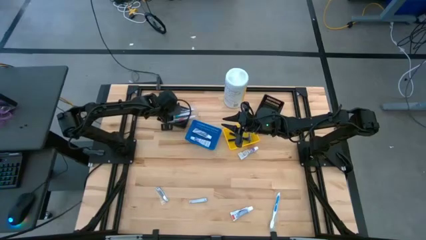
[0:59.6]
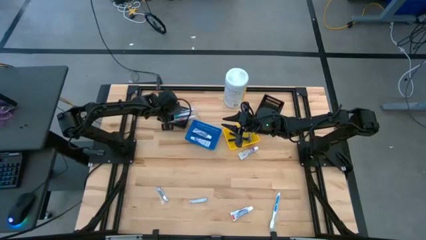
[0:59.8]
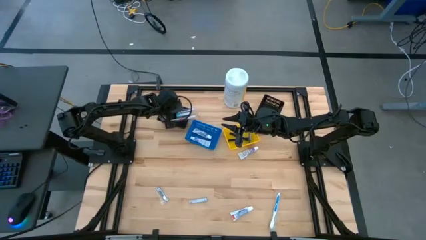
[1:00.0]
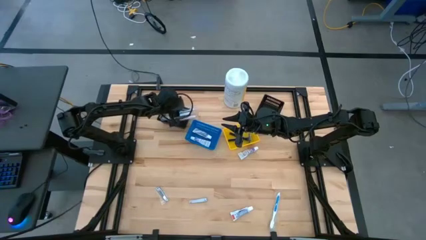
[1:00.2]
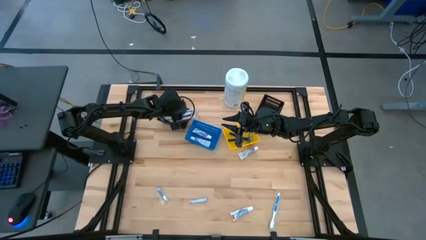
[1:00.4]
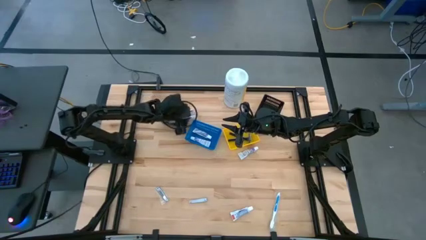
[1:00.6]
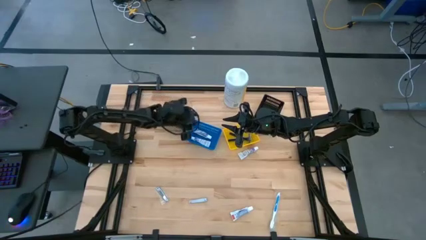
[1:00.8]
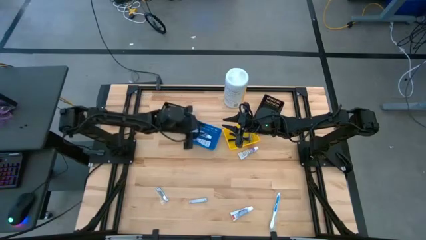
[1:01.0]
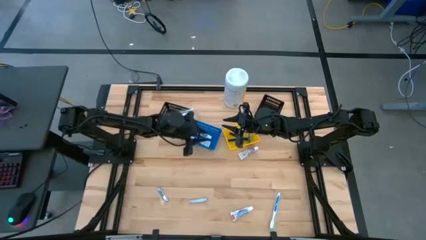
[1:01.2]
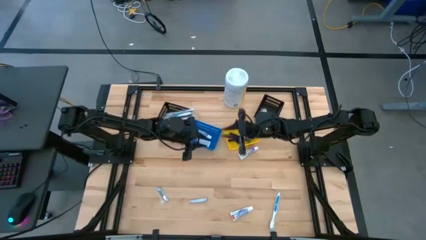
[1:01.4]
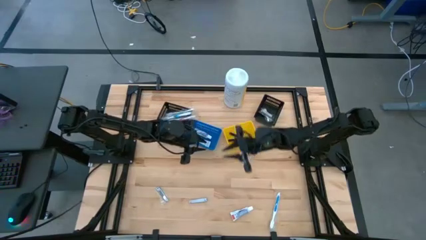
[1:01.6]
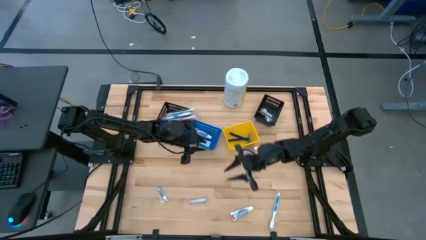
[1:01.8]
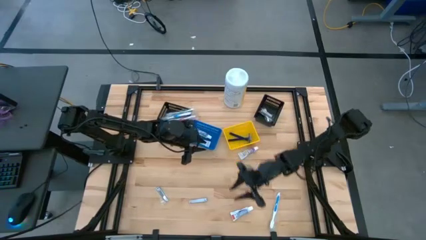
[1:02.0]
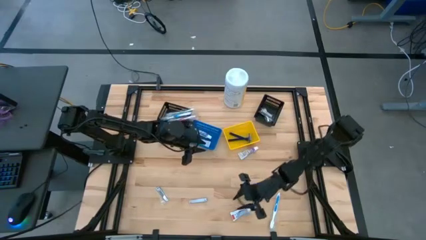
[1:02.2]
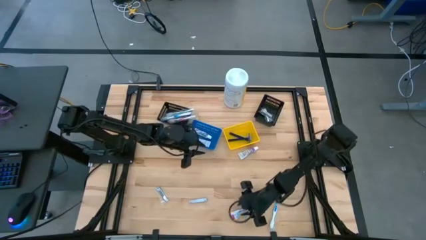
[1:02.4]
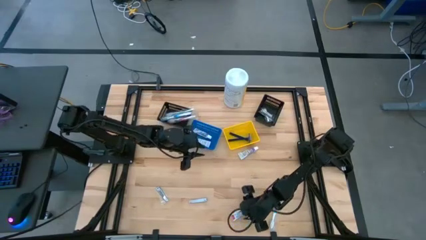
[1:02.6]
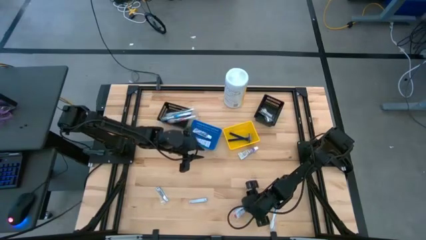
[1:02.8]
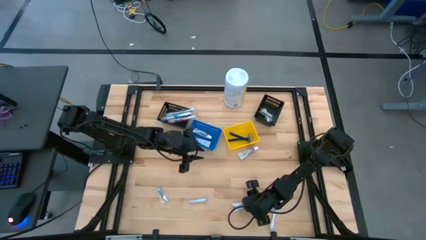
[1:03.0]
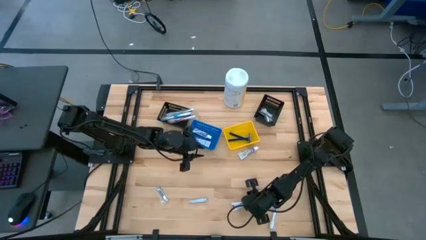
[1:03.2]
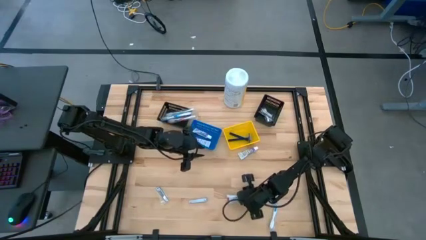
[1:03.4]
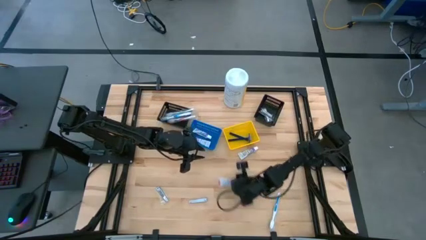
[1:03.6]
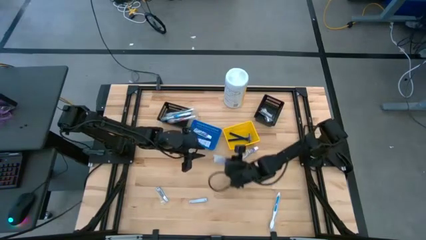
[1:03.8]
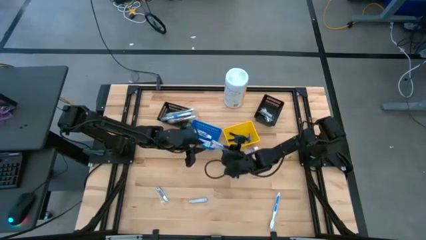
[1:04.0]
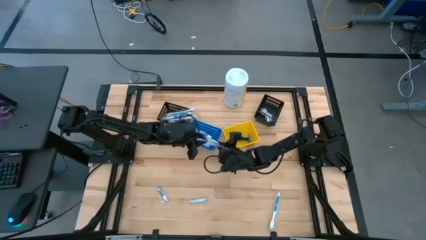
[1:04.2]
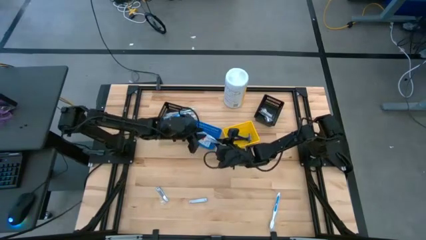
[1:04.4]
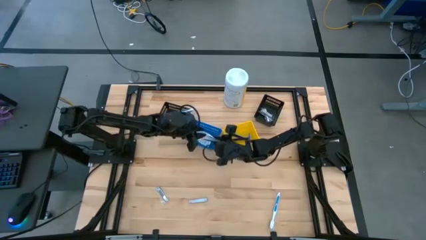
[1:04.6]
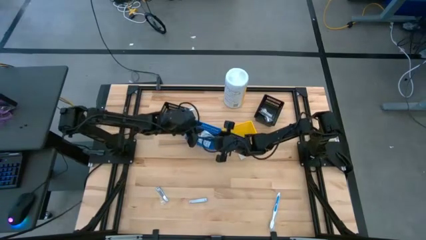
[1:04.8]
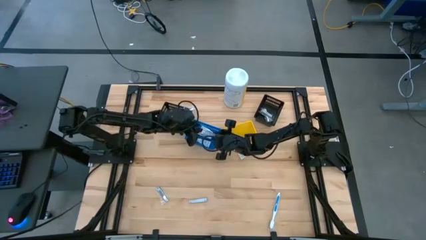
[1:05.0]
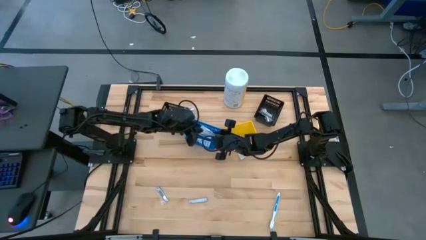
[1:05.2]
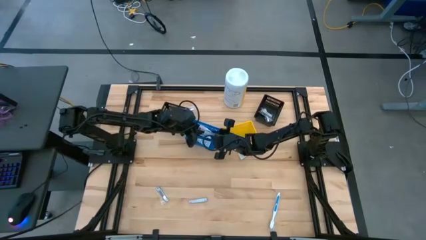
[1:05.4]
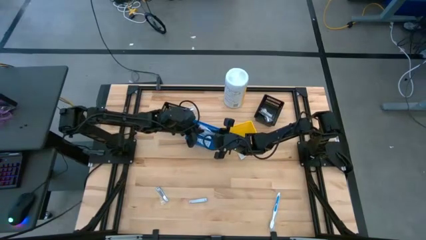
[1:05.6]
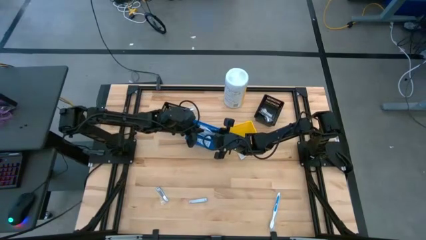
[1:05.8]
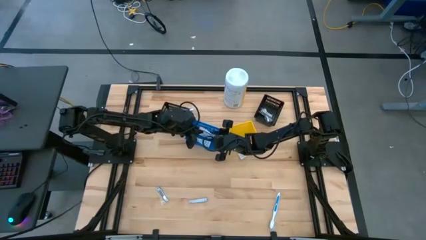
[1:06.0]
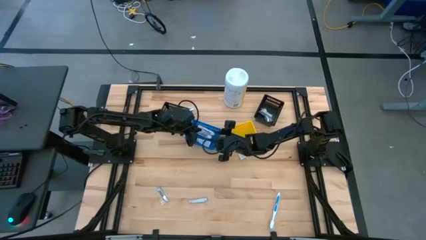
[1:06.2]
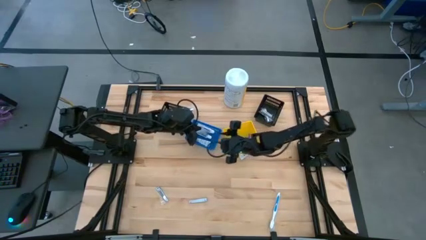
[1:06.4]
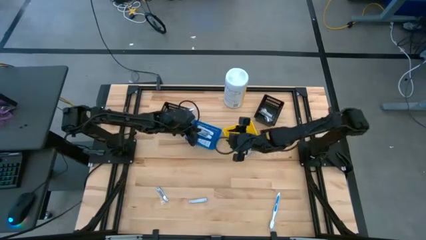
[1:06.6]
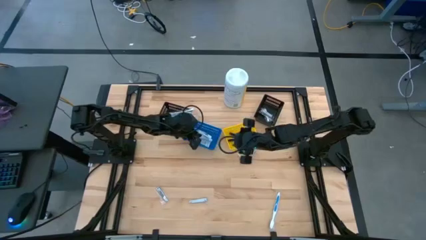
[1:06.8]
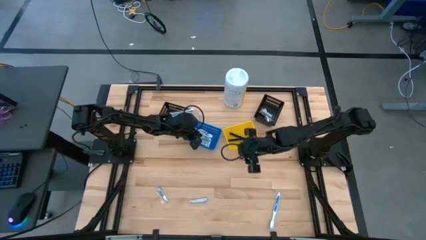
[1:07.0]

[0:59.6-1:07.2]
Task: Pick & Place Travel size toiletries
Put the white toothpaste into the blue bin

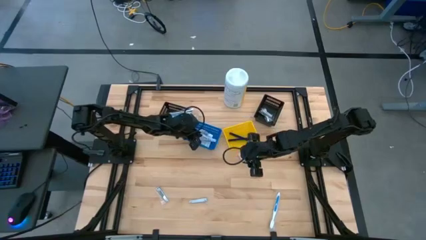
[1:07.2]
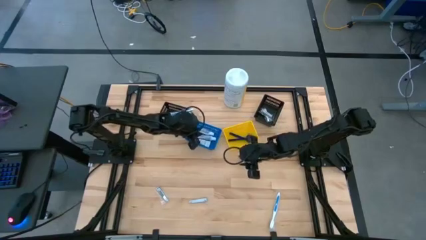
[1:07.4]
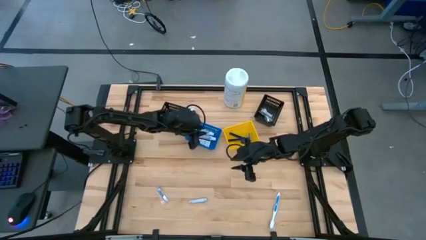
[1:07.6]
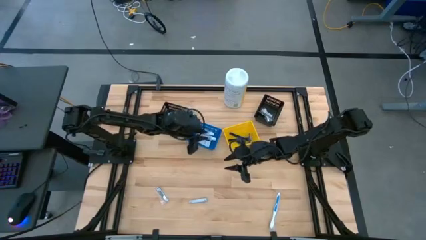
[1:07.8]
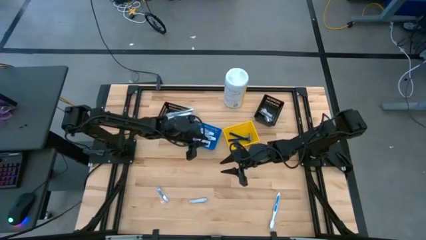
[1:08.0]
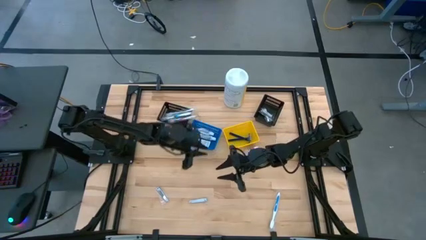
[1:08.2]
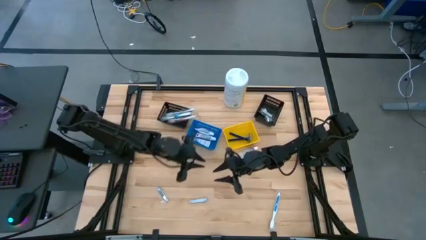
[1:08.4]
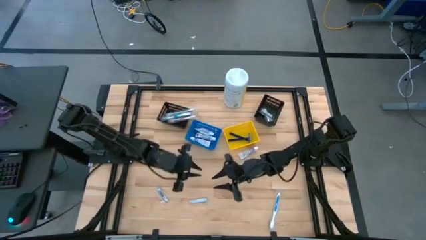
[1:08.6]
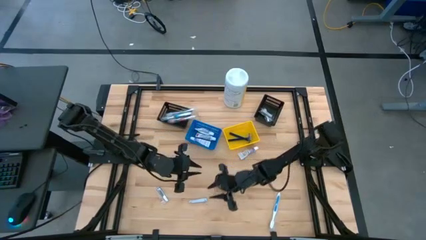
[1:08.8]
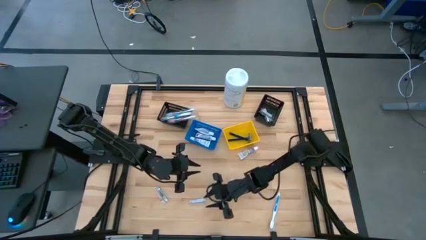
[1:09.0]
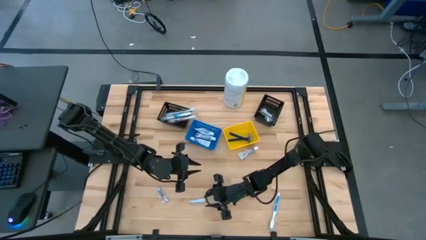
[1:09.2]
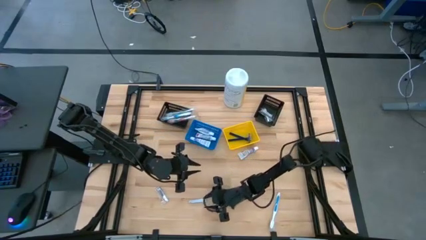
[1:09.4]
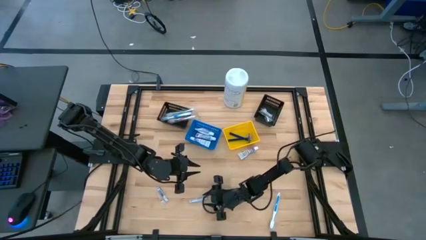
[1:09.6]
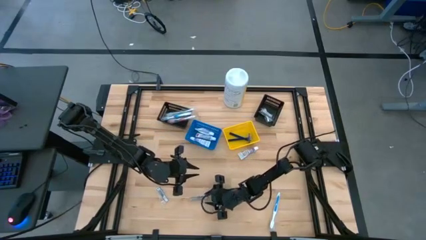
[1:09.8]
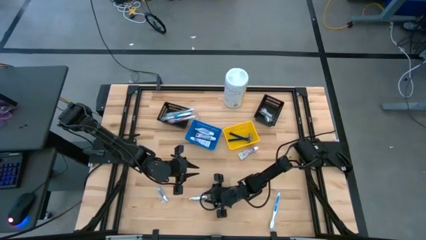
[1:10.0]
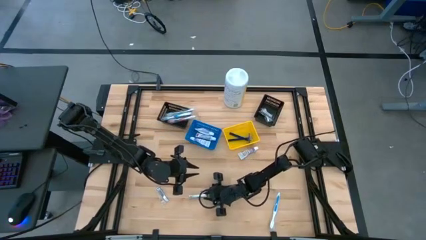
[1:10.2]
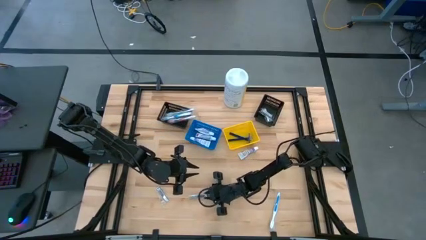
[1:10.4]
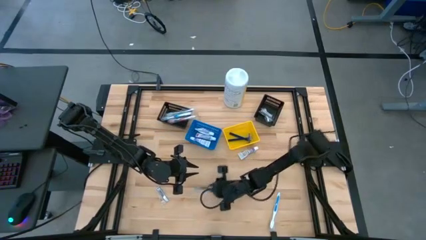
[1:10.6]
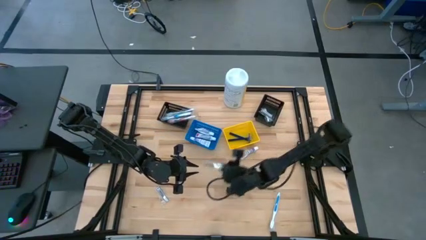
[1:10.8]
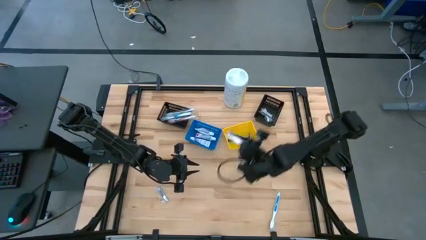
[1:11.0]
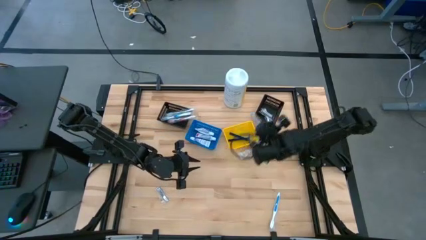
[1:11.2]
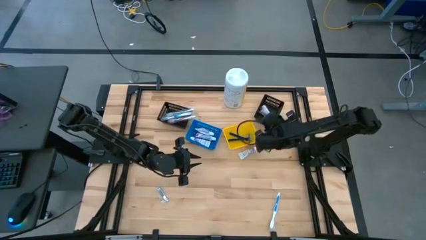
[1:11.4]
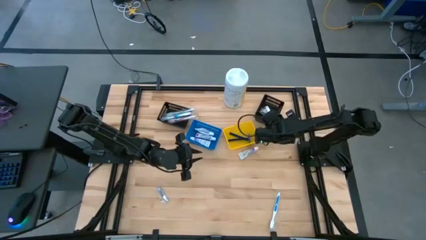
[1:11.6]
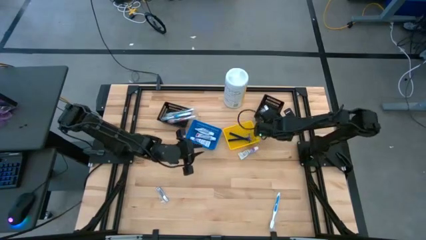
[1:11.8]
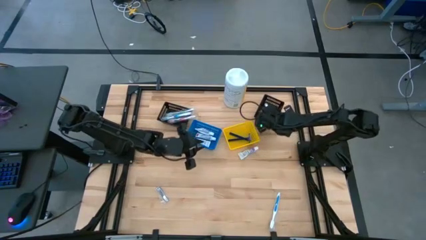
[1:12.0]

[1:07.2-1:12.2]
Put the silver nail cutter into the right black bin

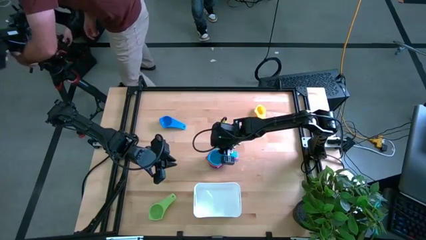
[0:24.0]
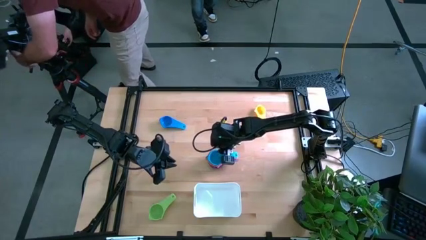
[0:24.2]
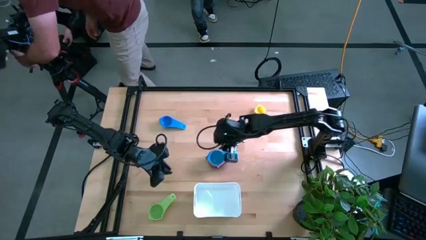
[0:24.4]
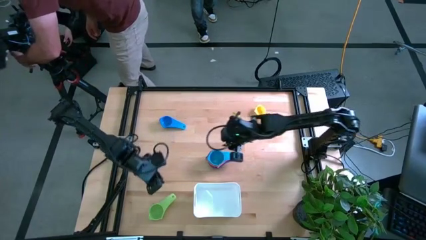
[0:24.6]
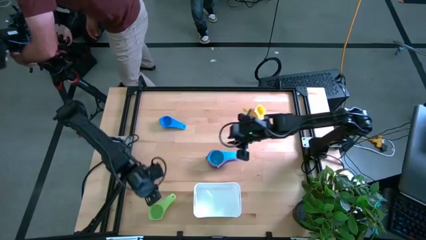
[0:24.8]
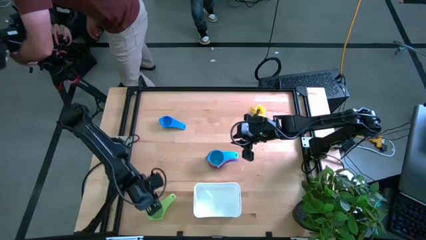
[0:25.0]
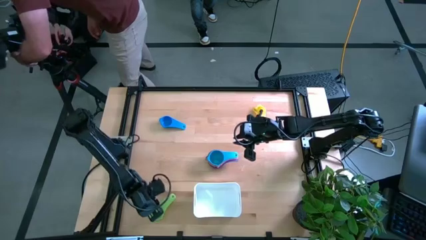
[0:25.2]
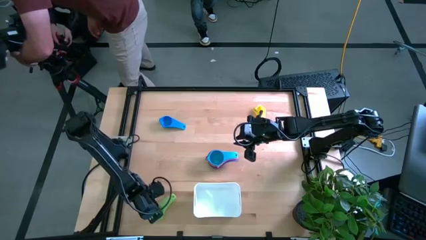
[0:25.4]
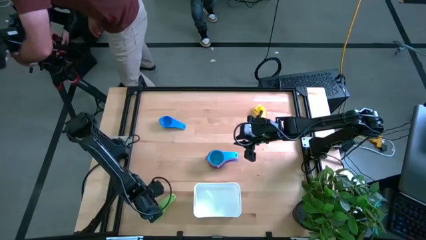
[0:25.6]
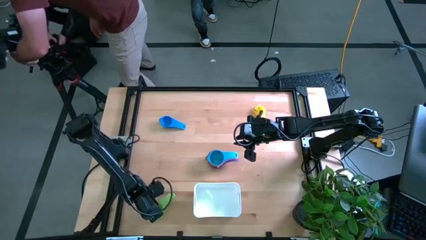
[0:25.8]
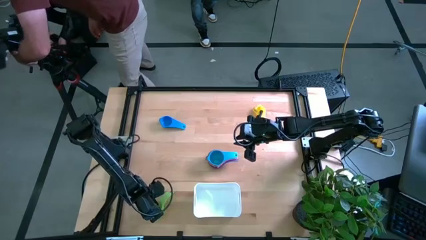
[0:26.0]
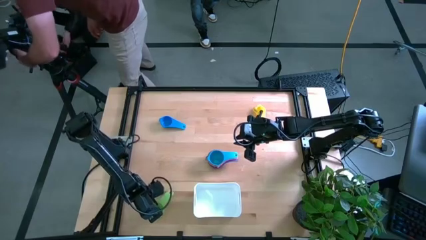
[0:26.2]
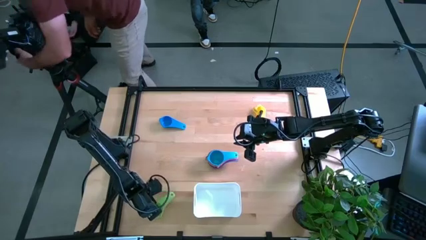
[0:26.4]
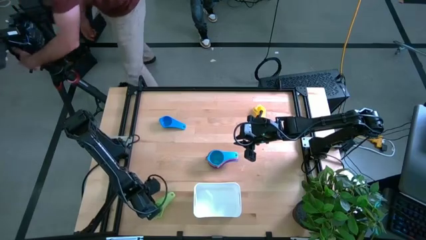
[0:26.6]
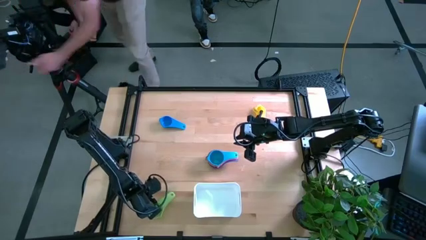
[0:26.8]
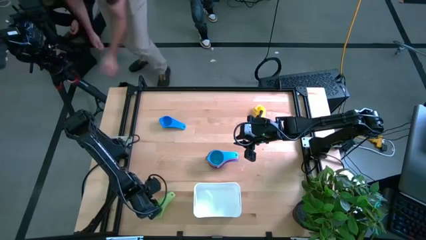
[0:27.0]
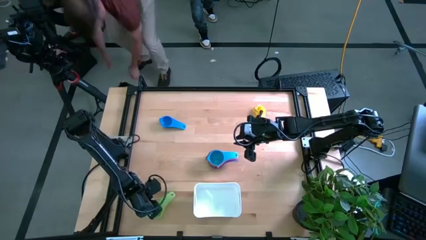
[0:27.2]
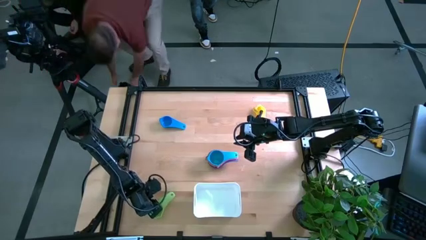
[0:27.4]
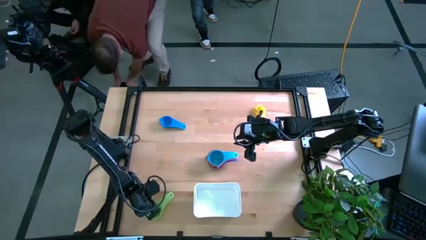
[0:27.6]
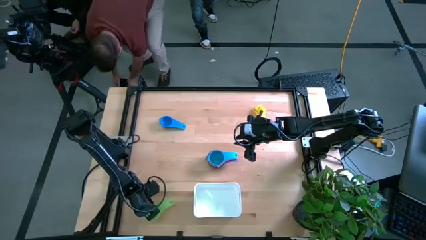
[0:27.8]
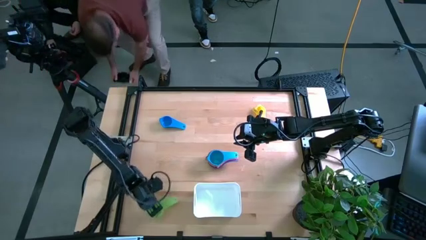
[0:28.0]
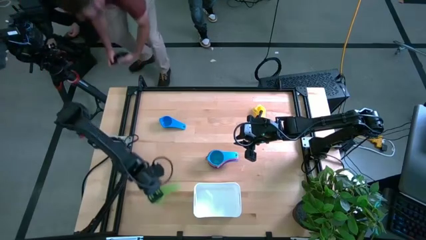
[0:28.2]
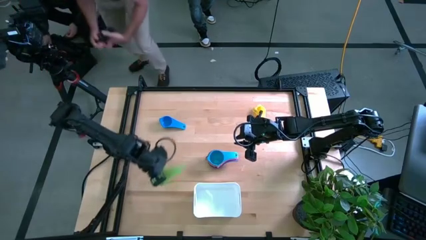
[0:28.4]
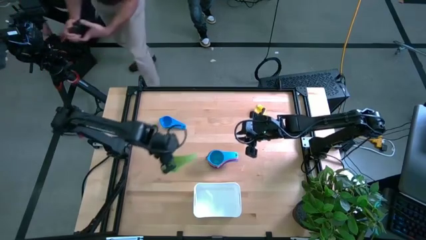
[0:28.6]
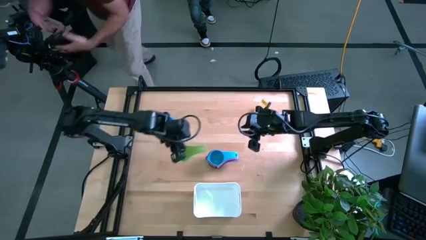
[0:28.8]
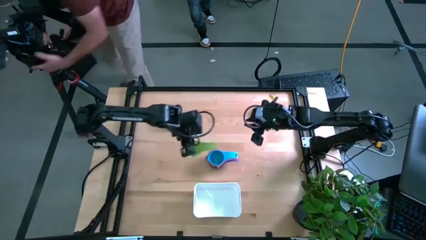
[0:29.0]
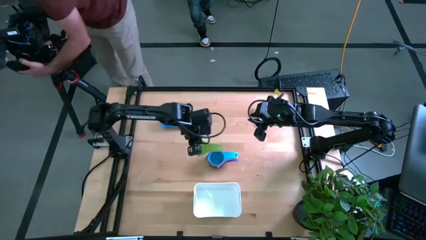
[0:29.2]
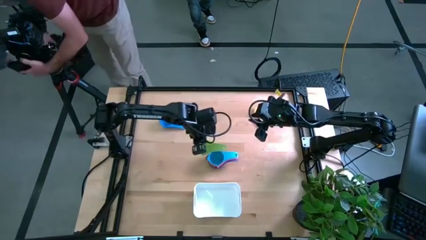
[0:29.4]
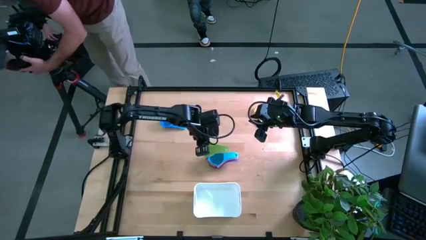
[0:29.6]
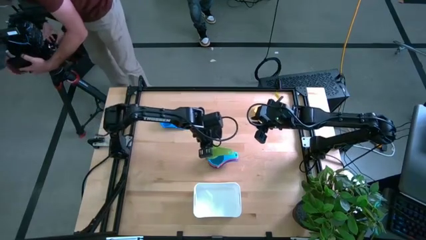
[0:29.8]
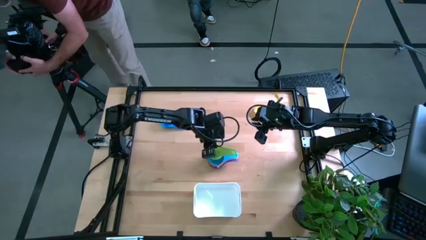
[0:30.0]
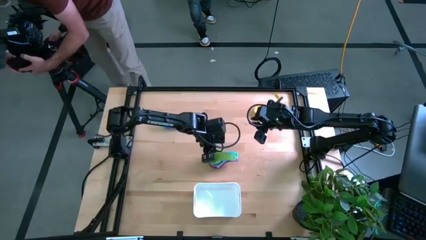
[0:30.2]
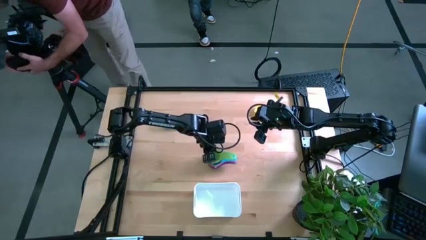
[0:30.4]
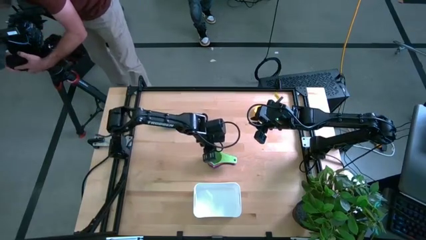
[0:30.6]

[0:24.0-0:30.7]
Task: Nest measuring cups in basket
Stack the green measuring cup on top of the light blue measuring cup
